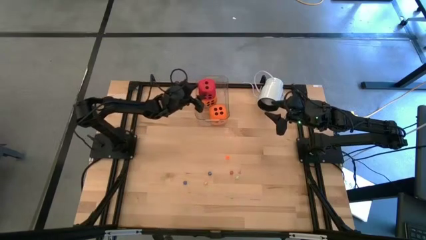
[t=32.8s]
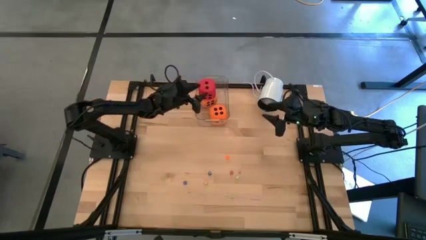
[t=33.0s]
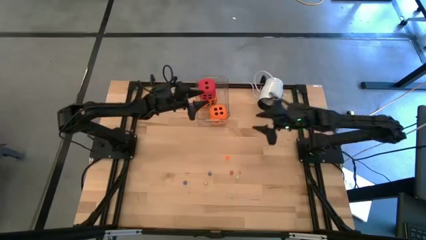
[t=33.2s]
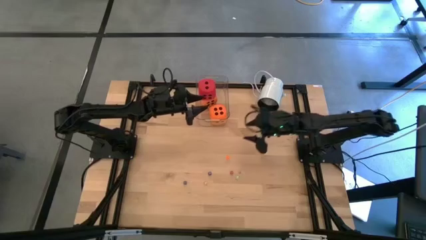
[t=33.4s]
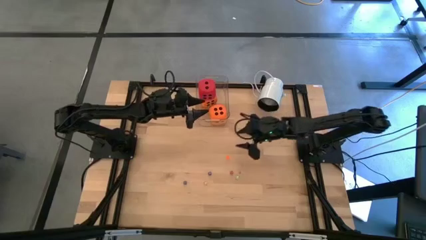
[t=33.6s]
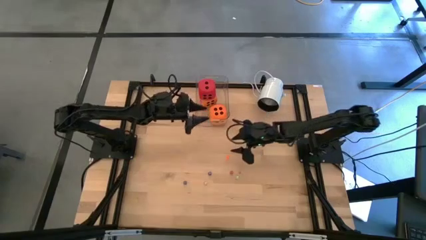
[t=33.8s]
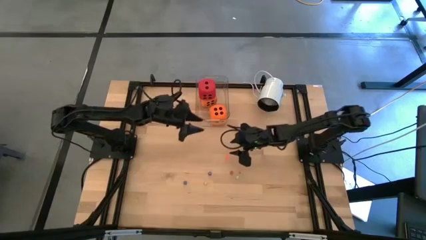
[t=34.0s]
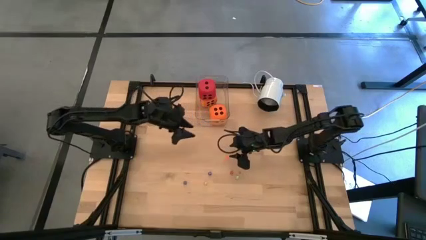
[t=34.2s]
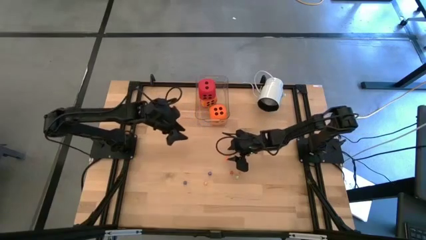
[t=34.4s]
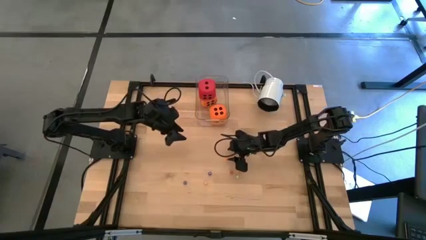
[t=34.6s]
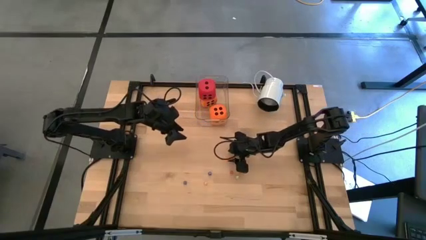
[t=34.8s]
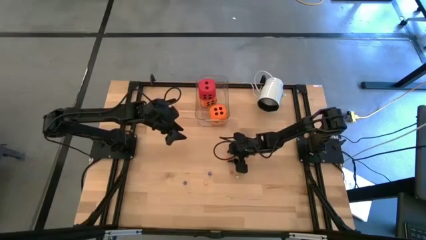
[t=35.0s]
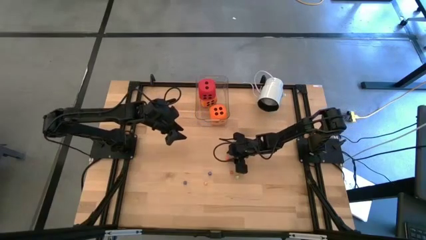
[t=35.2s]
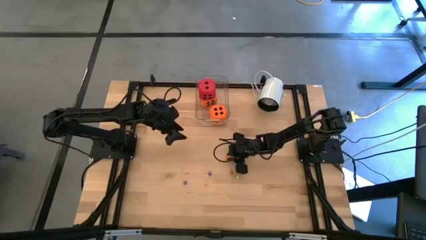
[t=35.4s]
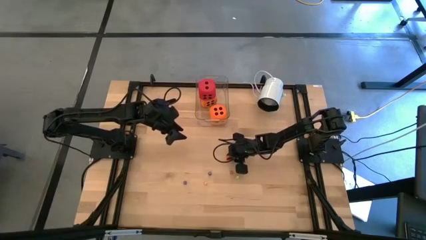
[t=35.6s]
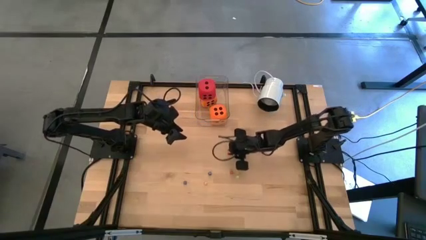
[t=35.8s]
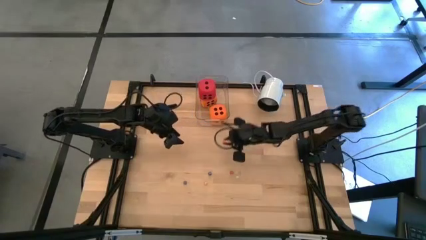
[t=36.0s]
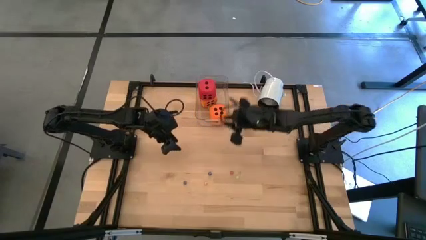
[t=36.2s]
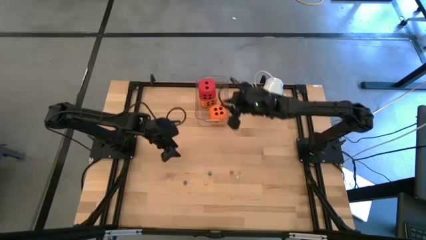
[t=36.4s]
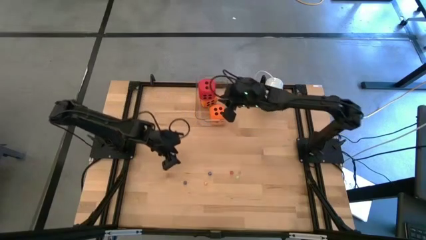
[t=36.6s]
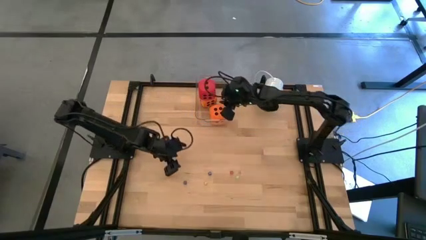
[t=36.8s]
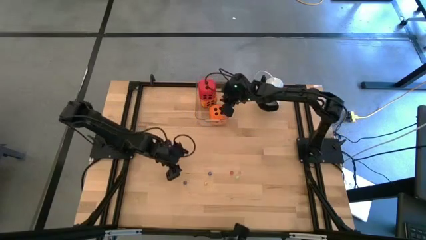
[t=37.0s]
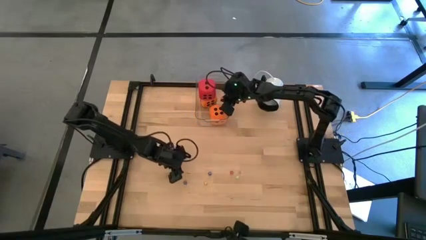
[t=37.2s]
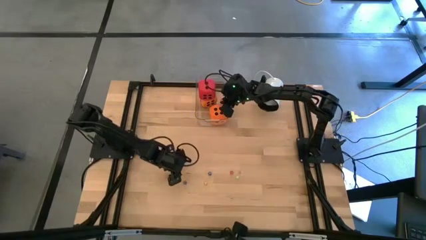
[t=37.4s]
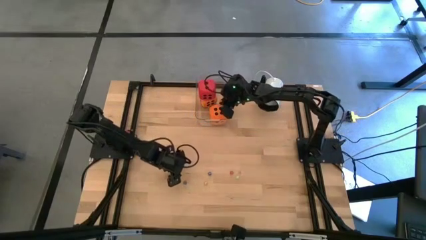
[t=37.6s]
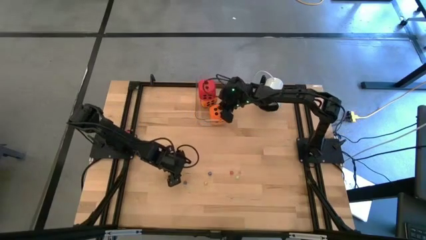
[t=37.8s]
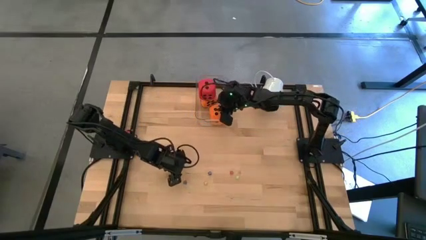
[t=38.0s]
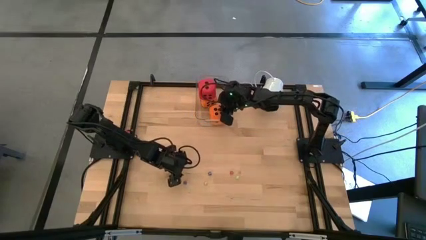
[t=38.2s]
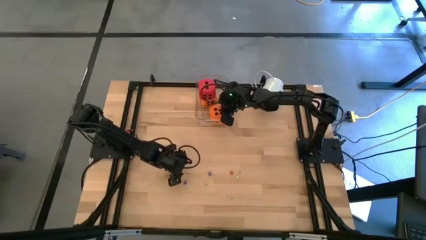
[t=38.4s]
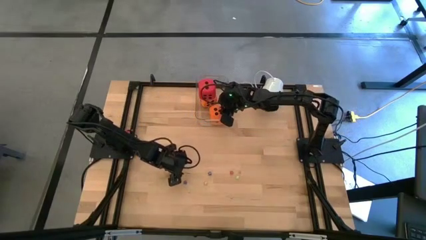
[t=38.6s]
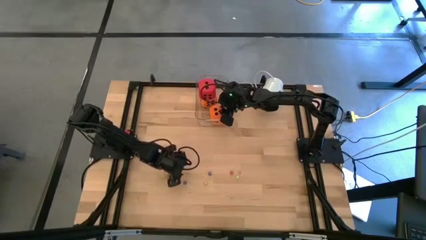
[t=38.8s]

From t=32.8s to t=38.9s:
Task: Pick & Place Dice
Put the small orange die into the bin

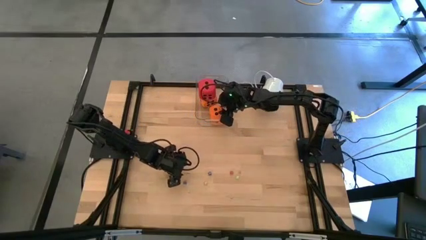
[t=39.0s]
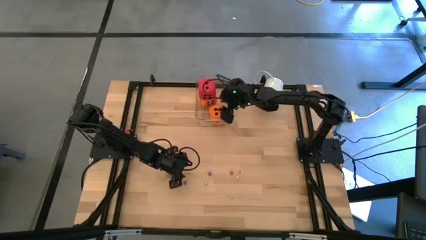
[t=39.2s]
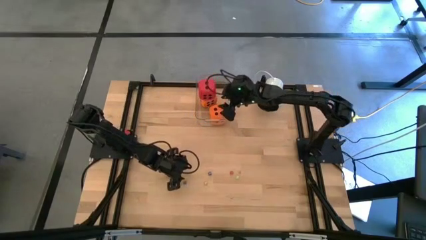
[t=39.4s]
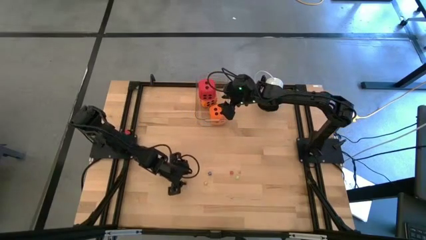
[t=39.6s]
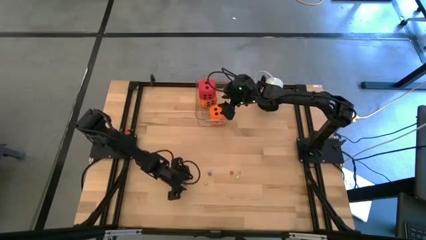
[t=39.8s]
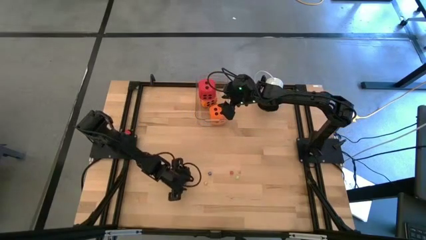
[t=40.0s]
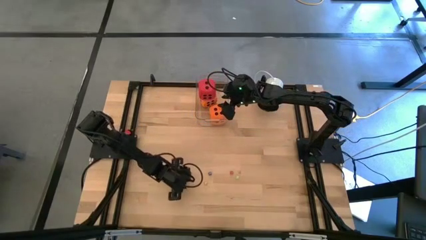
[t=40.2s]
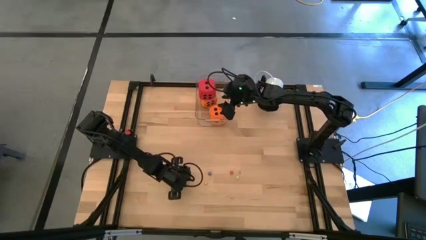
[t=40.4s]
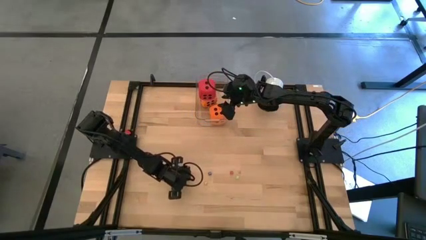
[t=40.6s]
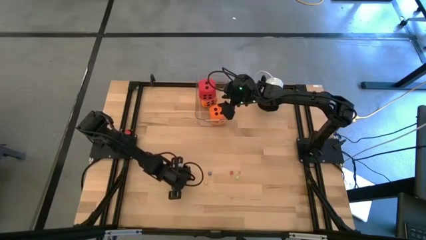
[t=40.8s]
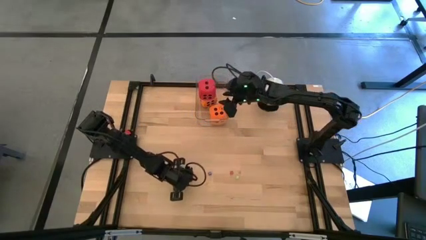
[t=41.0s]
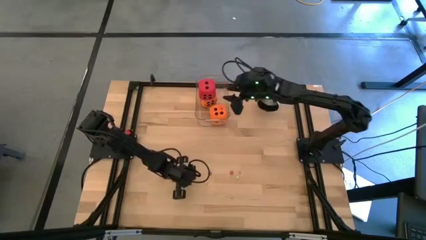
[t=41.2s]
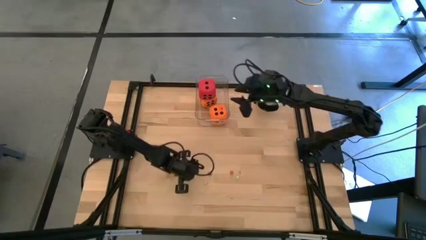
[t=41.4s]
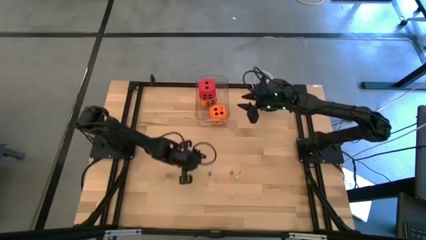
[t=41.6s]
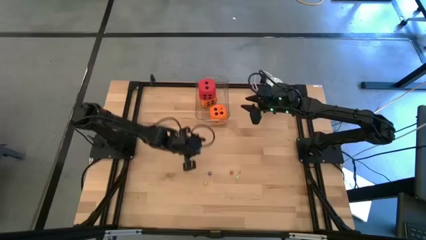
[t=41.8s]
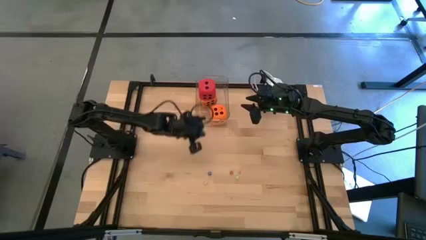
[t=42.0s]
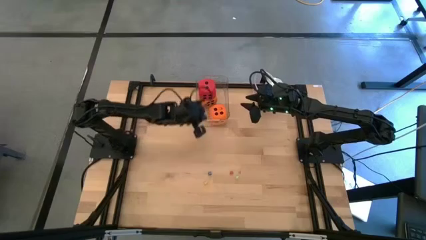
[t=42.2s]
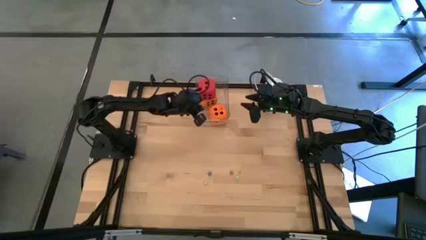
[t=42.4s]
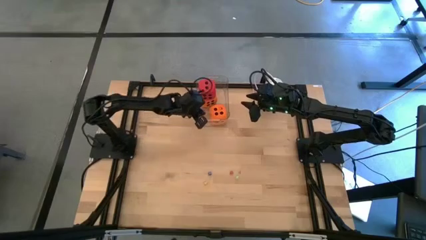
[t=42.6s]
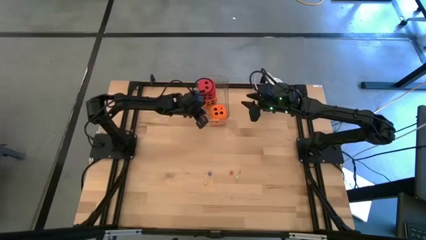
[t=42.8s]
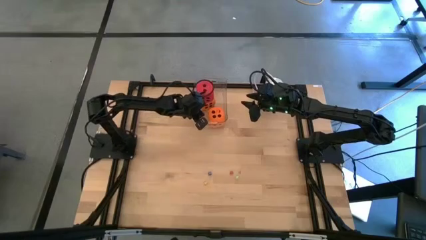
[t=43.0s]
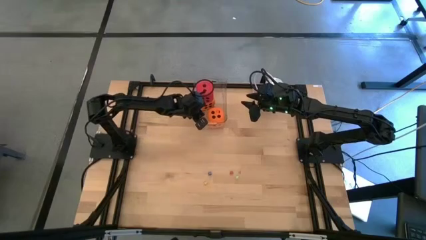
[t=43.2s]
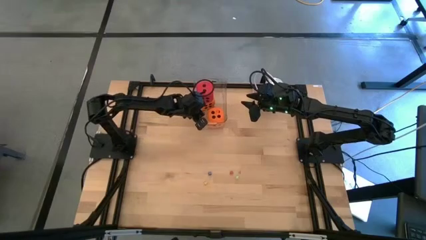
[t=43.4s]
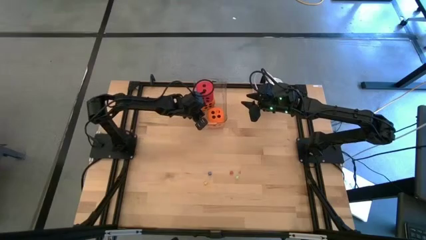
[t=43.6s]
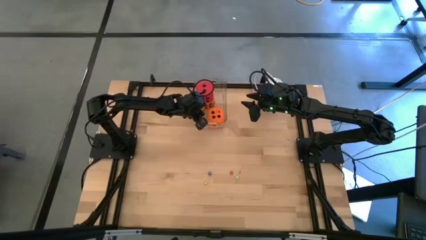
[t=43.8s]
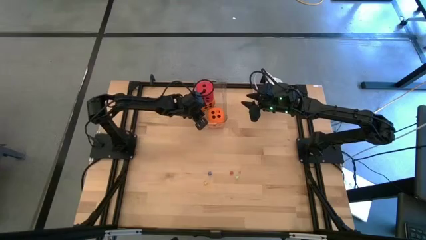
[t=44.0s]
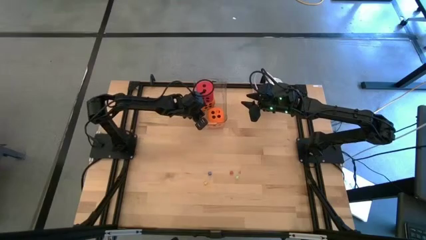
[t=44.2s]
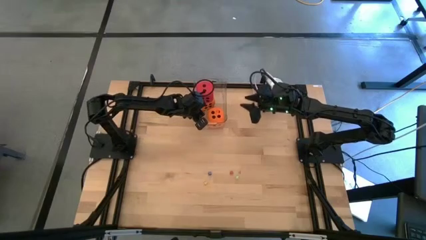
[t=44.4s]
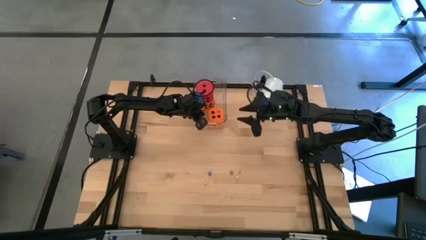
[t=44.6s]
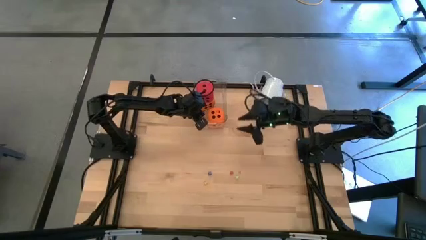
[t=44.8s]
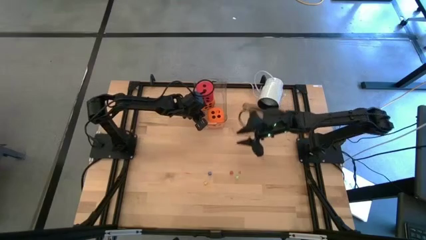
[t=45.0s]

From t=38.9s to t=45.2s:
Put the small blue die into the bin

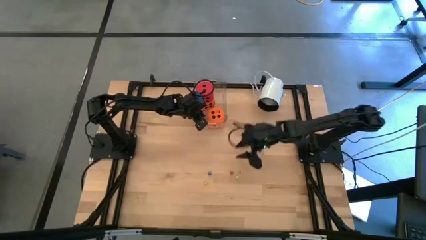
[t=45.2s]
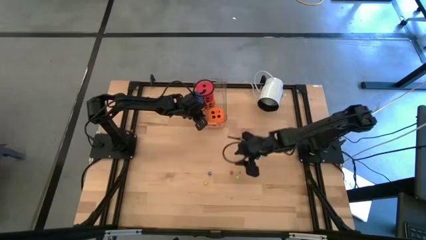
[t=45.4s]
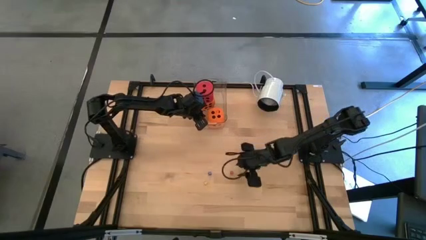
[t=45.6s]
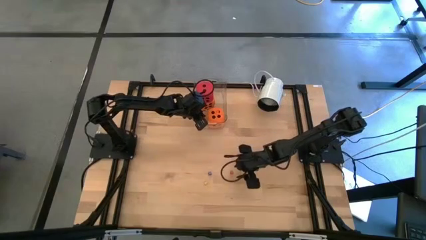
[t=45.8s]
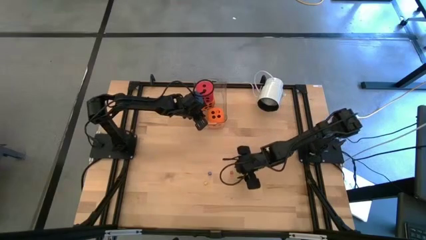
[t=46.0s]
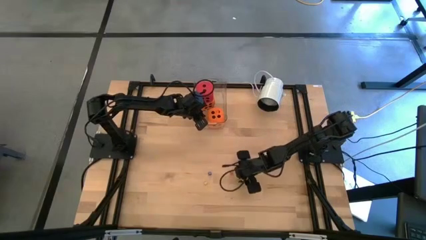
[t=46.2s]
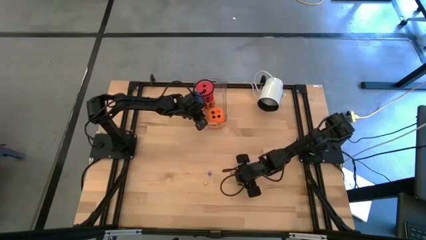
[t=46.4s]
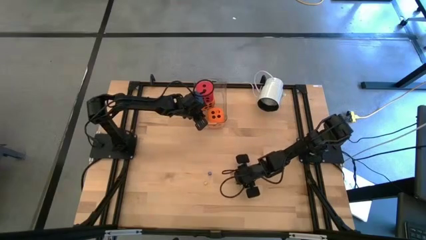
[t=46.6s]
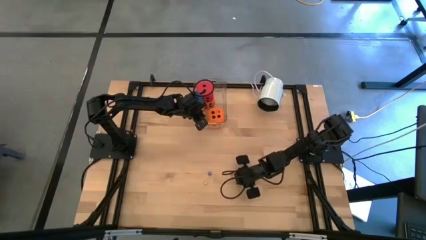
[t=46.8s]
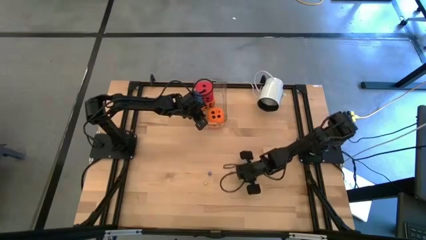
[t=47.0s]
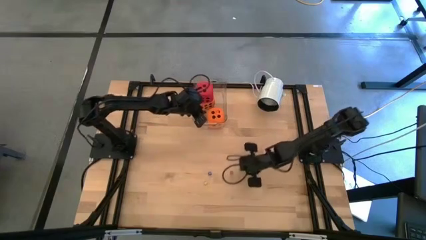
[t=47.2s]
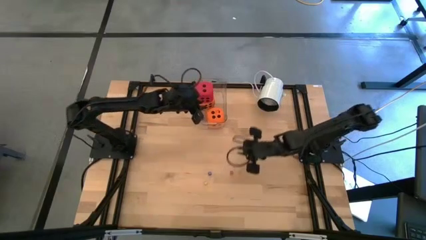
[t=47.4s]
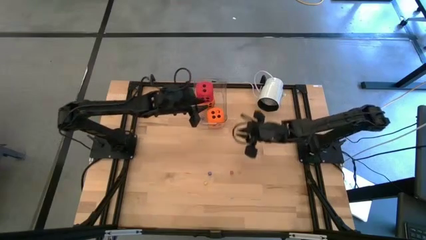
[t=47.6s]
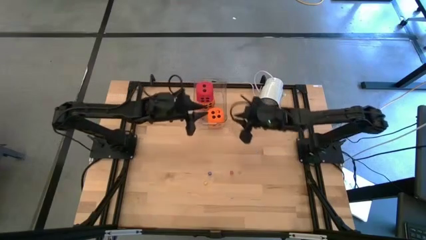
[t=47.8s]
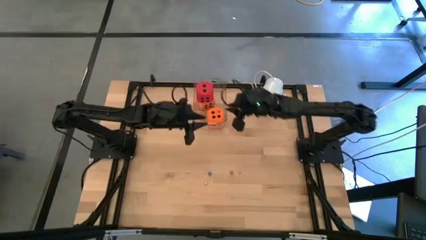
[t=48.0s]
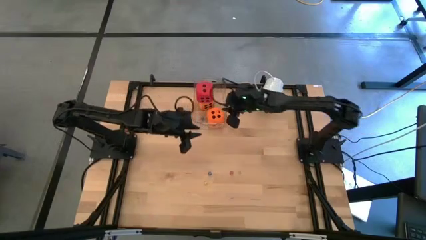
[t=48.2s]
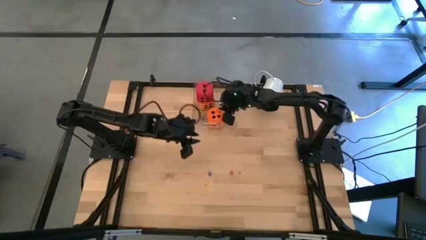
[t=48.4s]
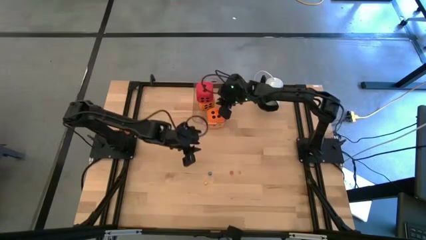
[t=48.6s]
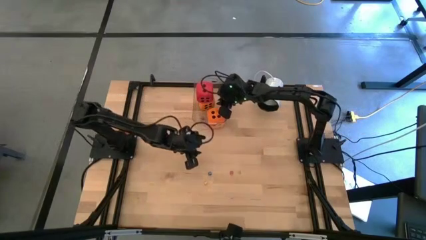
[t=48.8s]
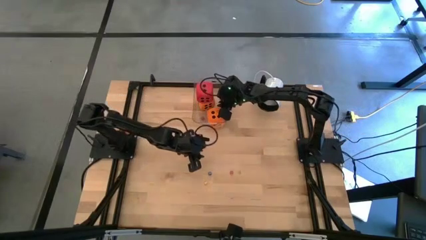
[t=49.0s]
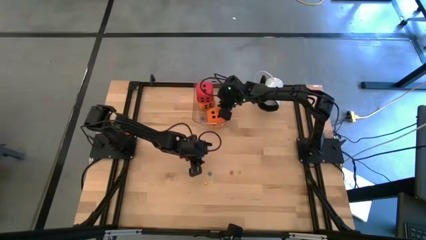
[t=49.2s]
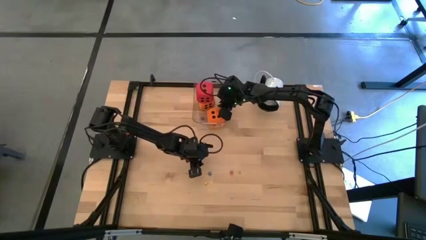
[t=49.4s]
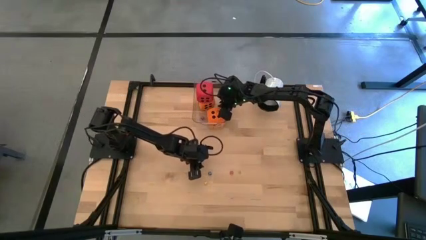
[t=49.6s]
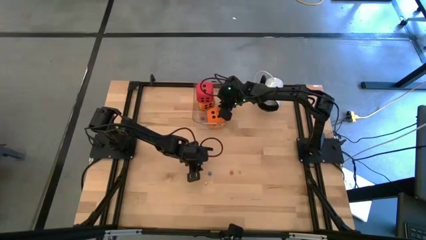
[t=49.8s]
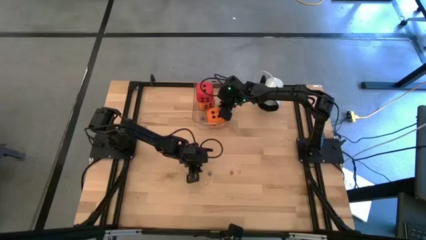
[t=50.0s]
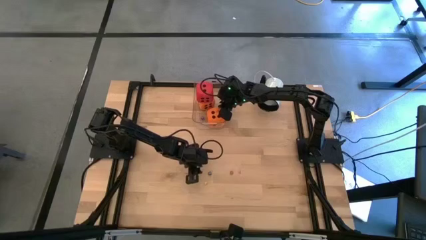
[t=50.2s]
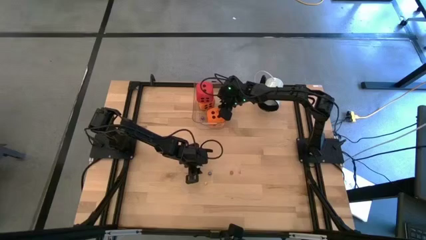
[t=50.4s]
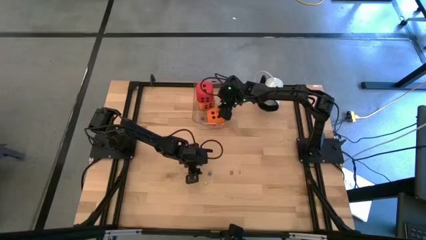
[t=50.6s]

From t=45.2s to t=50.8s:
Put the right small yellow die into the bin
